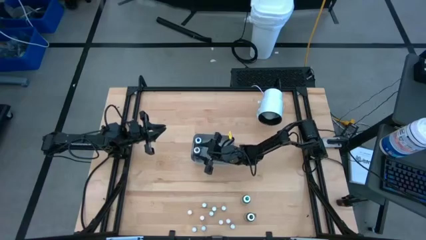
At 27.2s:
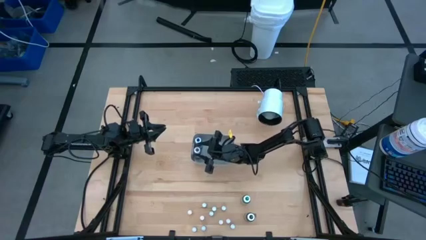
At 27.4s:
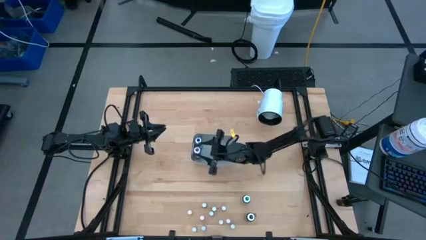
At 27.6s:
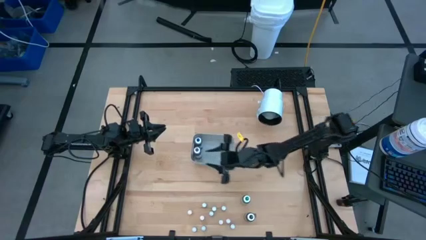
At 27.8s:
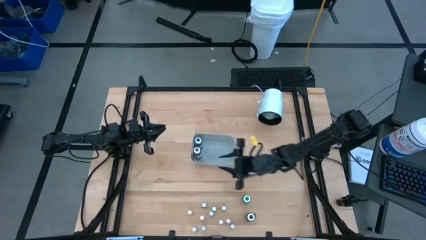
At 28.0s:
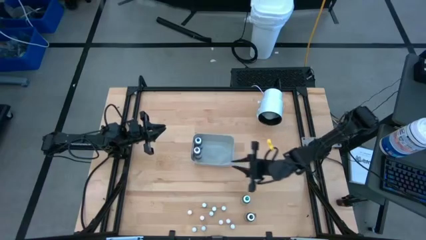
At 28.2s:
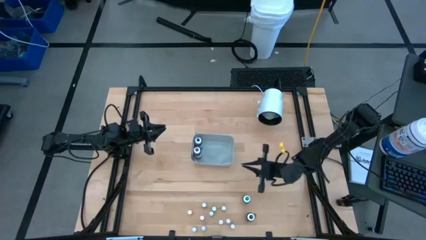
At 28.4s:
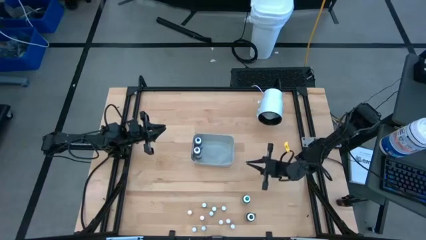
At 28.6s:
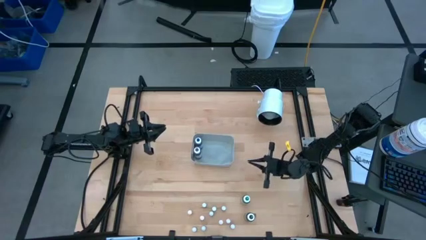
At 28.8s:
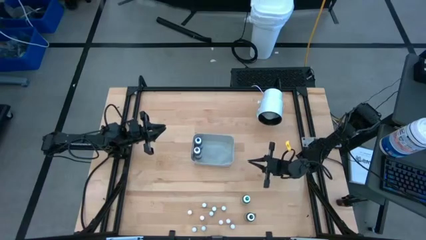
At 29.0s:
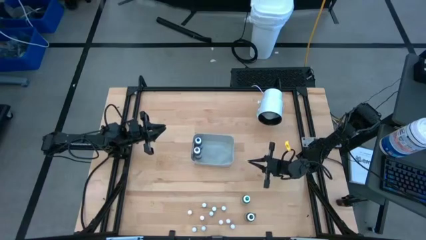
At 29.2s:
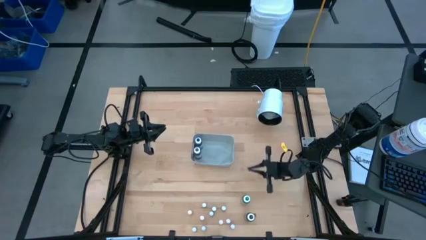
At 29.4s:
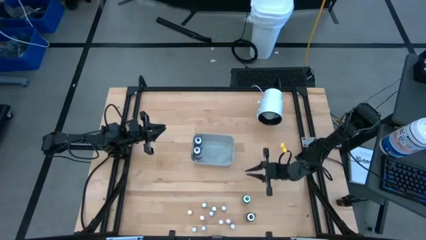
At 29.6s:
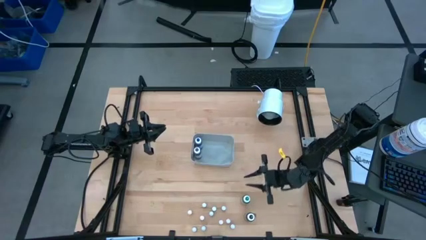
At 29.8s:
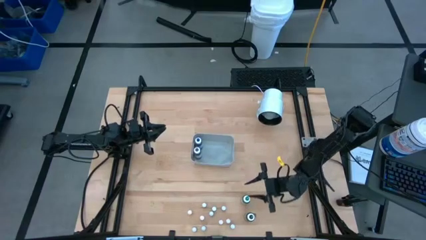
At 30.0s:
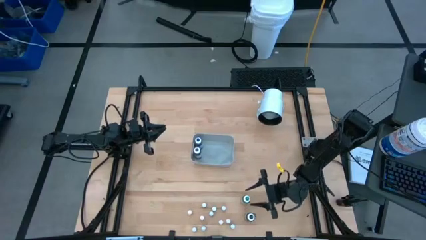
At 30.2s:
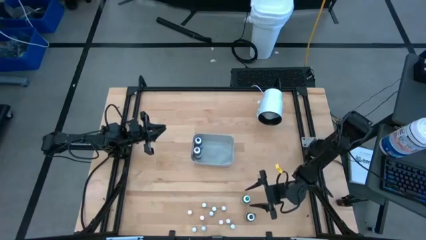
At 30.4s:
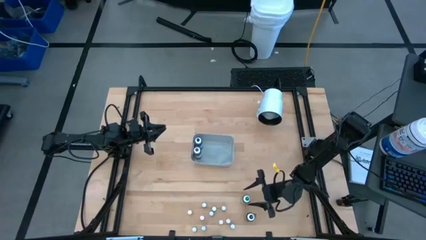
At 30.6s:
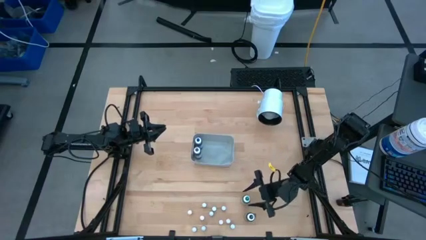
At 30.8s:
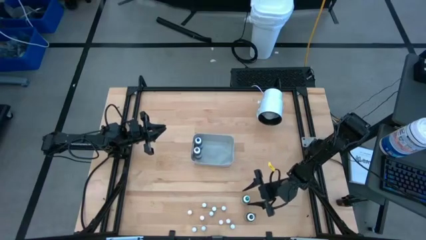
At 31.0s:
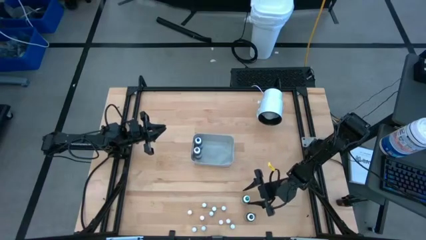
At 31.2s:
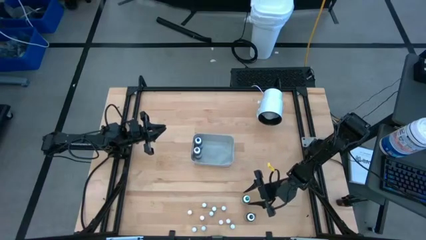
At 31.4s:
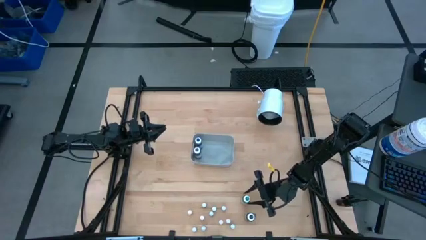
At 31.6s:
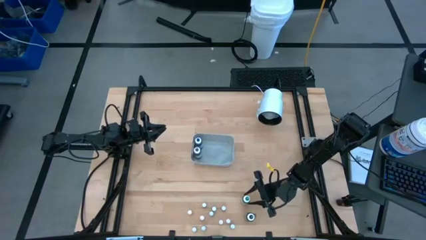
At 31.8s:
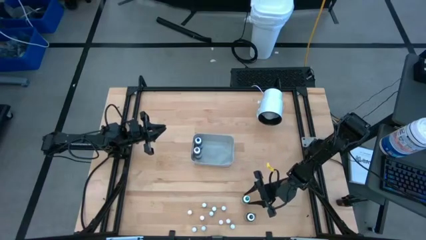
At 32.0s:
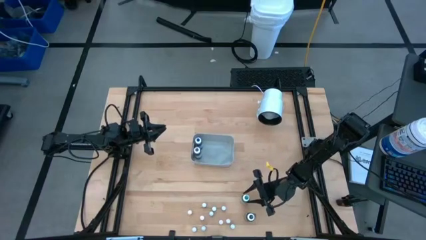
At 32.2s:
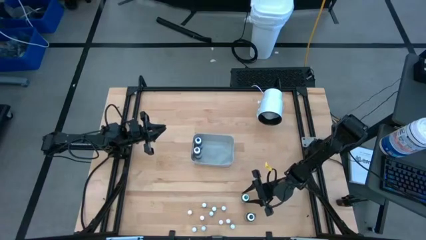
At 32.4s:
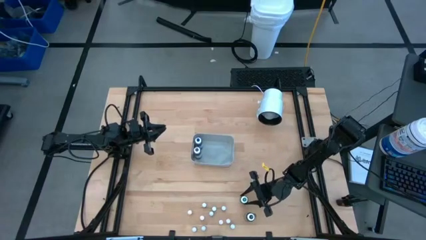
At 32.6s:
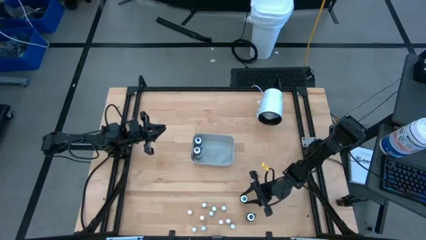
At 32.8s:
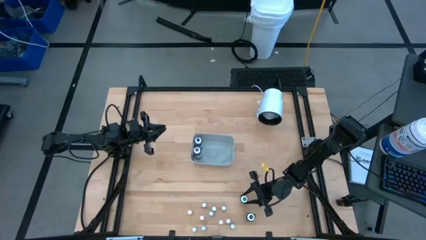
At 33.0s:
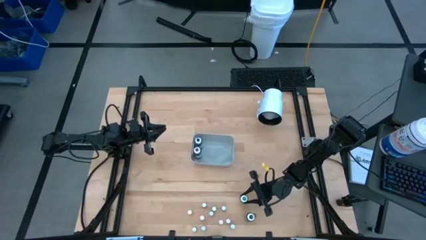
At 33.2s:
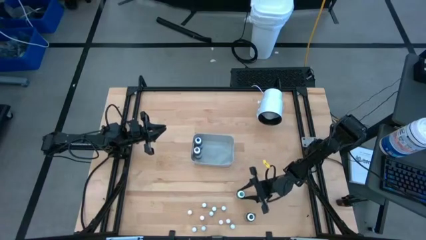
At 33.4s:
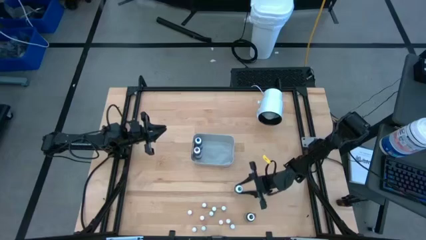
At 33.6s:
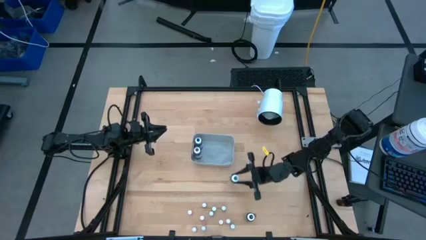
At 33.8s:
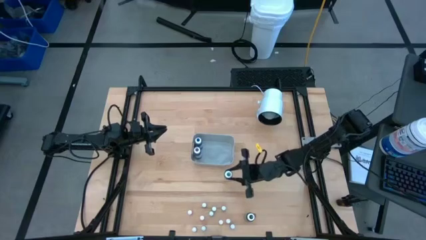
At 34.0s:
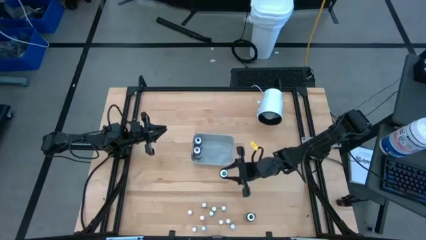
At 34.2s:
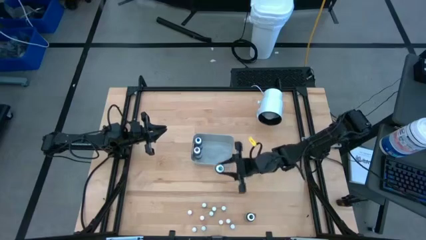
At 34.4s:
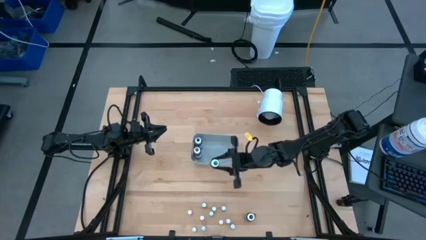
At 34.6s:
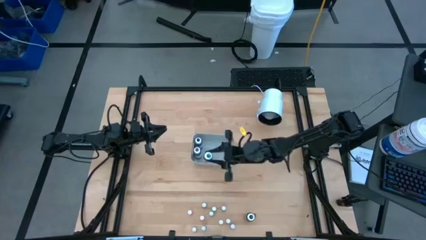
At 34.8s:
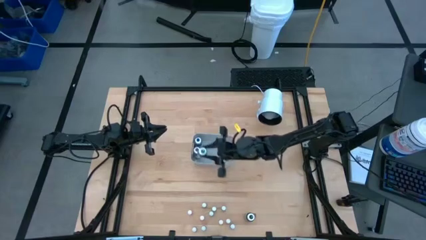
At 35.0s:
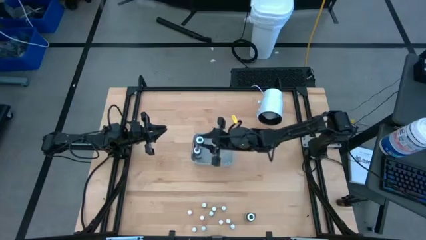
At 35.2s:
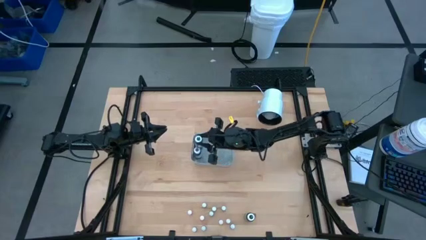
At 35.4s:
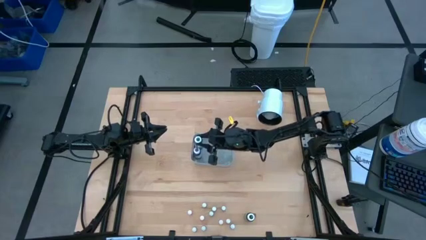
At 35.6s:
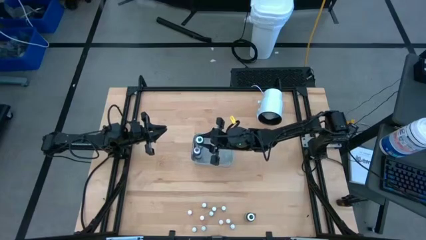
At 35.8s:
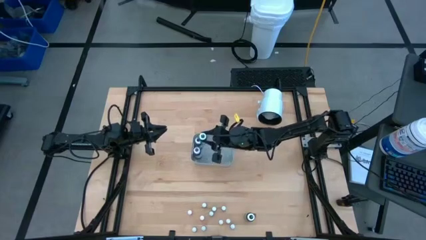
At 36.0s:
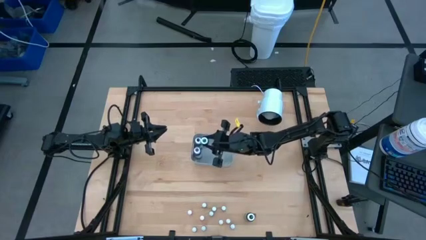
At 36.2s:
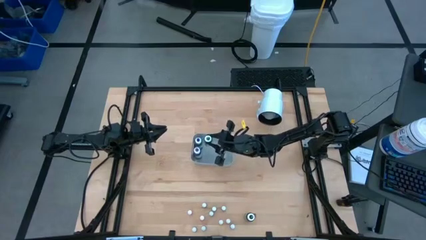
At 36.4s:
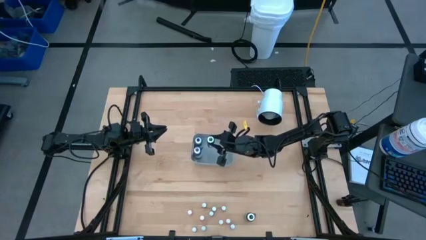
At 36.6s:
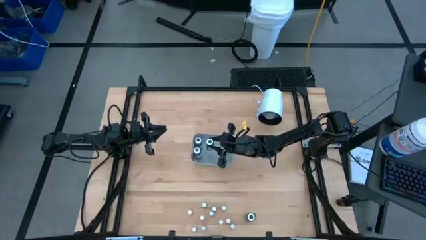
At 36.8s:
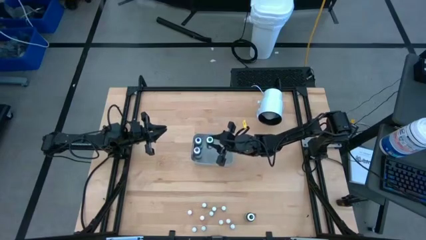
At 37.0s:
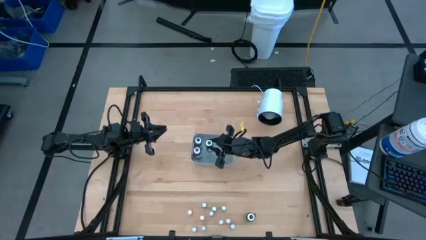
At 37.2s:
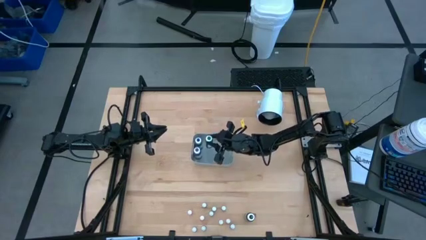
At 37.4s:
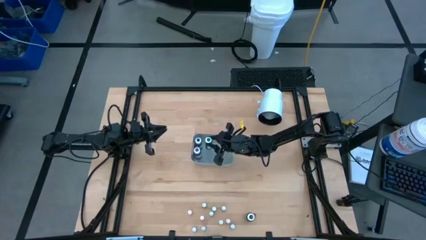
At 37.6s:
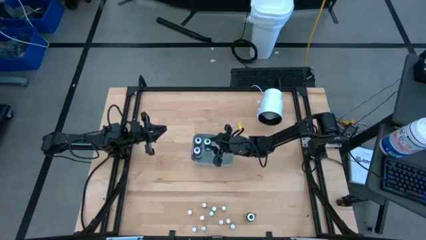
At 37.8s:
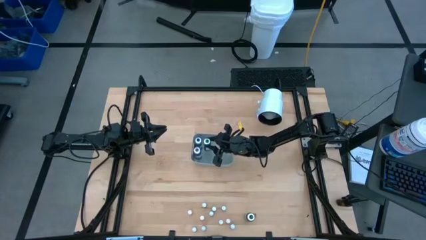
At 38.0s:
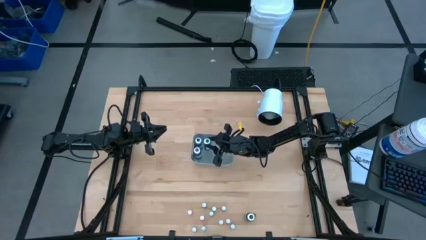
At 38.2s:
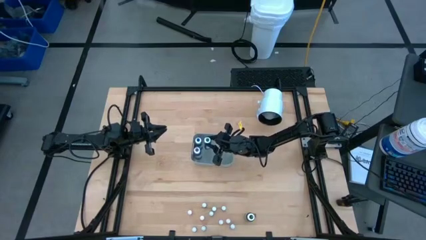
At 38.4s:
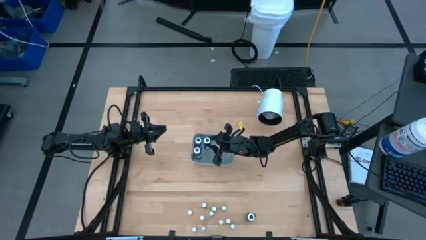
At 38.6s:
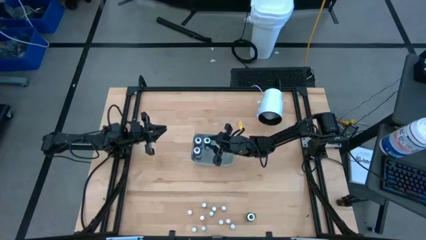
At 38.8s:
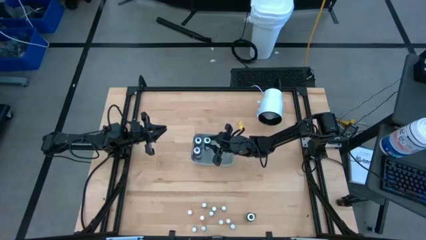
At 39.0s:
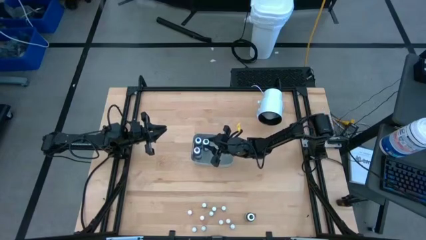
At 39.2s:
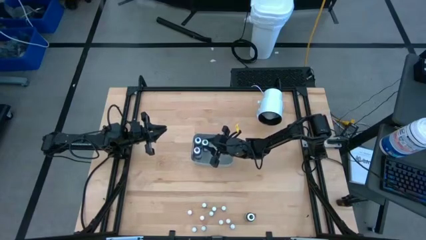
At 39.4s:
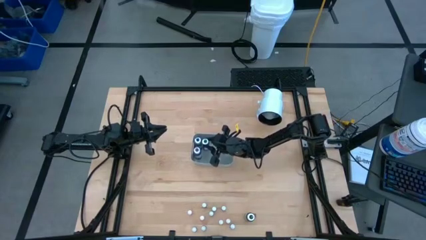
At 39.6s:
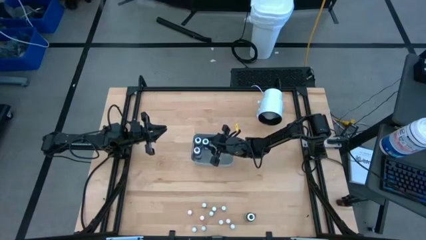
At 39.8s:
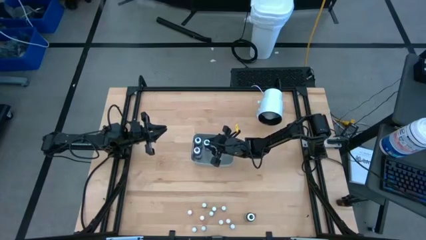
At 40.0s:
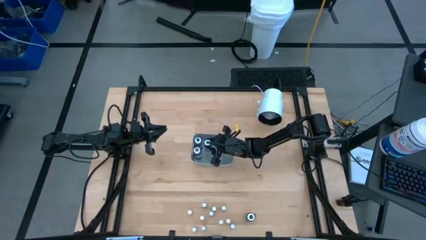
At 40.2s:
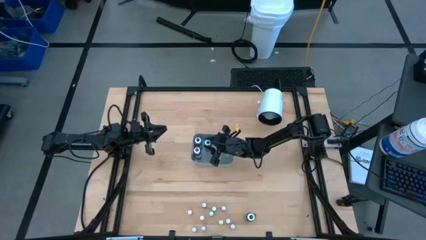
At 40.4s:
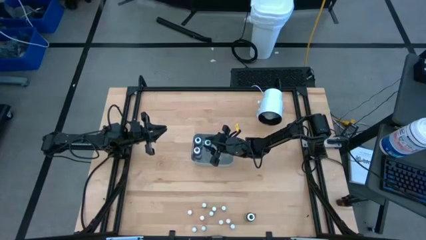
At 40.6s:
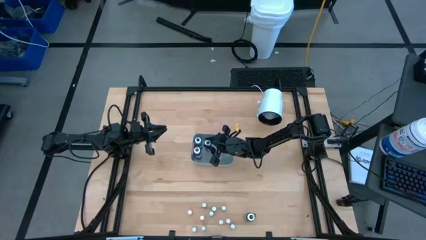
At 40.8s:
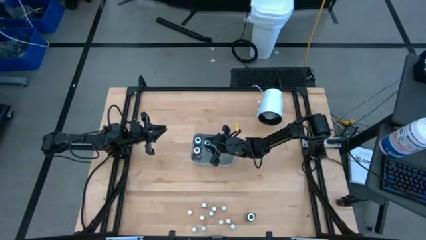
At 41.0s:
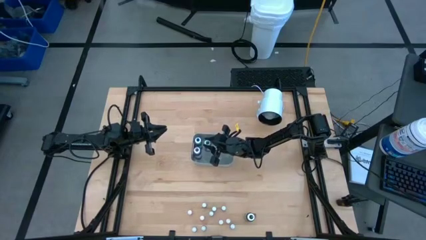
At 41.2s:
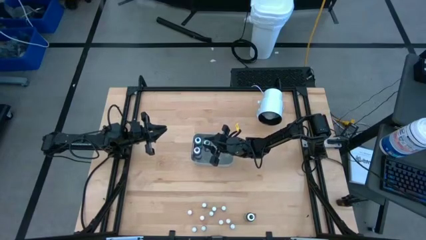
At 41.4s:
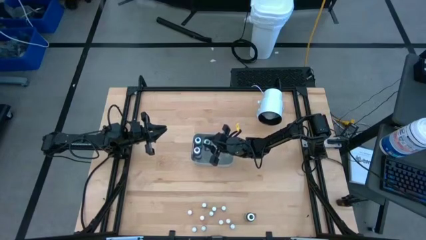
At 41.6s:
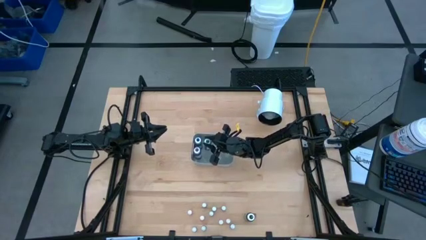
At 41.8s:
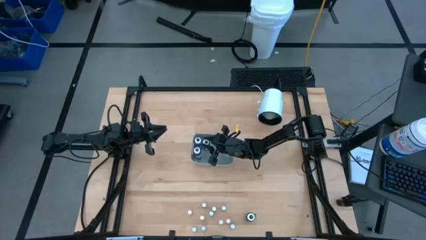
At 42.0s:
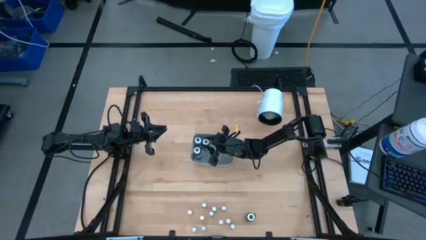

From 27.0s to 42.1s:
Task: Pick & Place food coloring
Put the big green food coloring bottle into the gray bin
